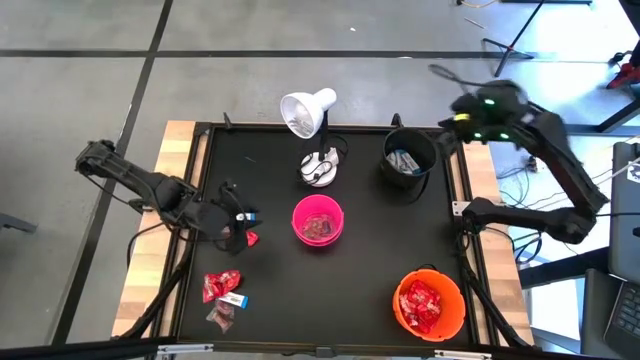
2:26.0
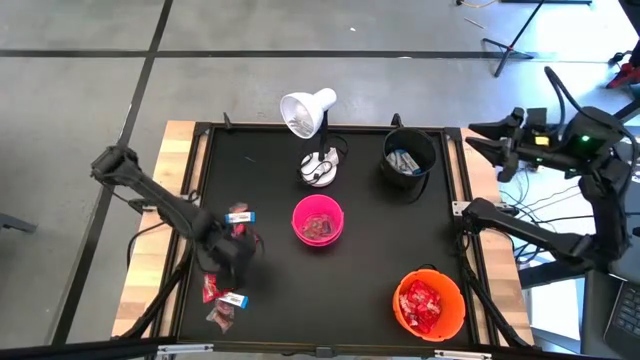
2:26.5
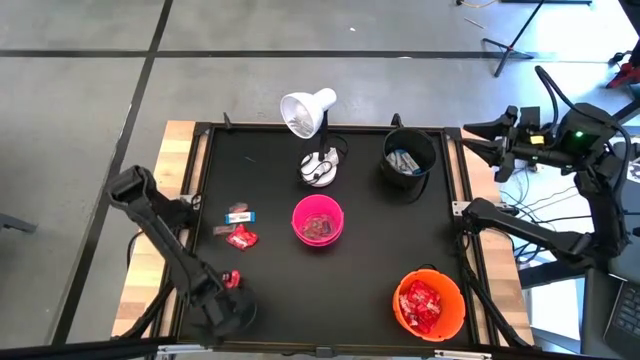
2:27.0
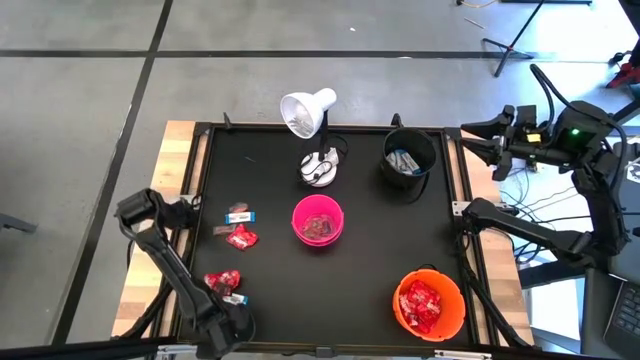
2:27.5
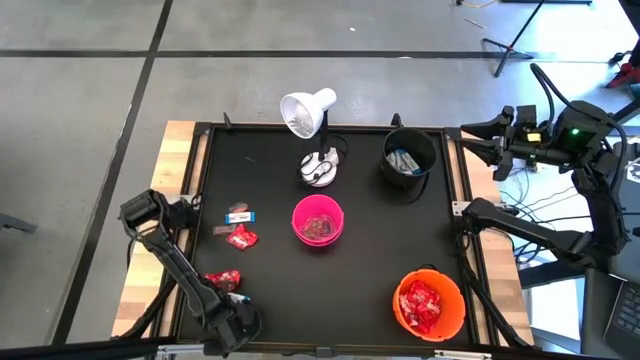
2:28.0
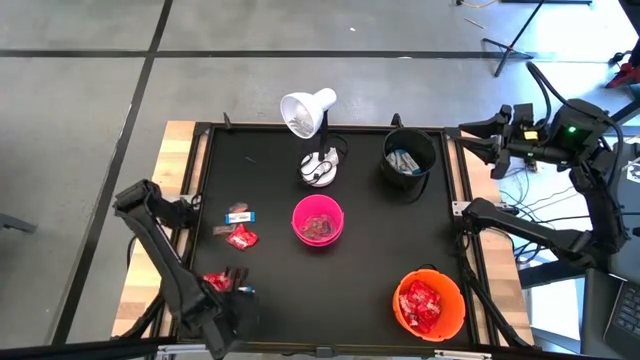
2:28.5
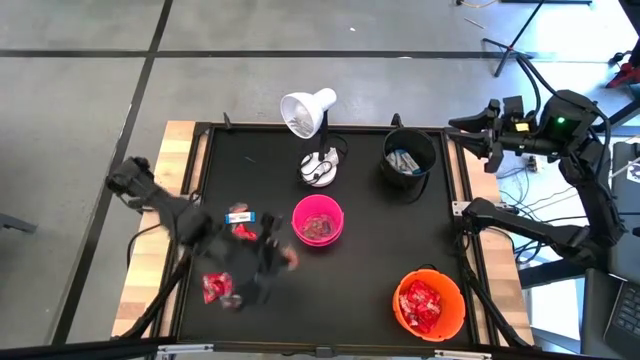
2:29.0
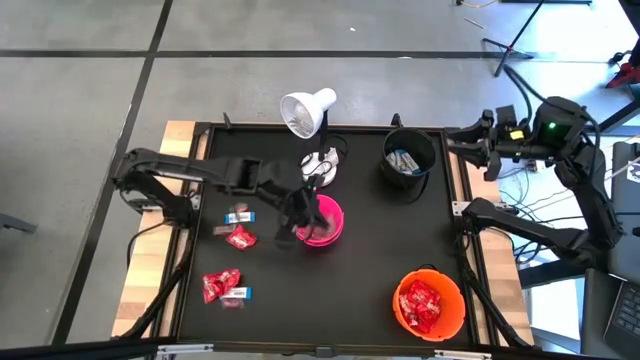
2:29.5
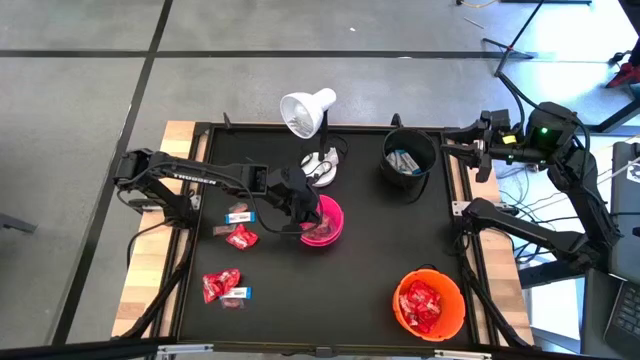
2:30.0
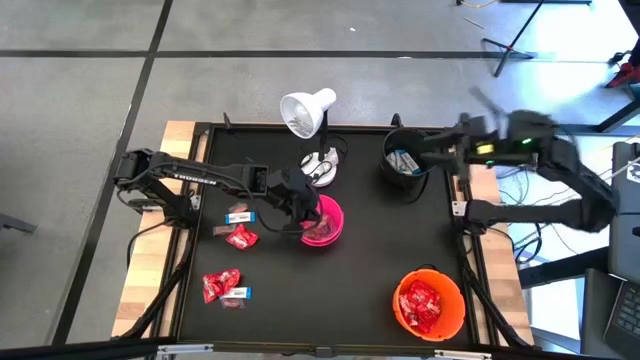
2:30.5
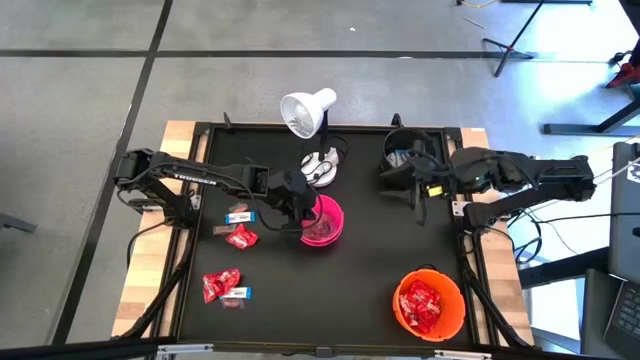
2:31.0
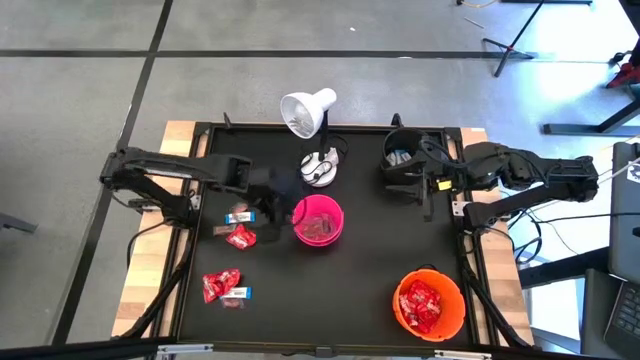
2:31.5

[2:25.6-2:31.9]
Task: Sort candy
Put the orange candy into the pink bucket

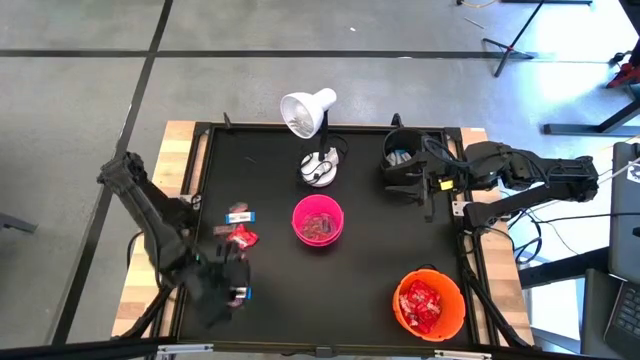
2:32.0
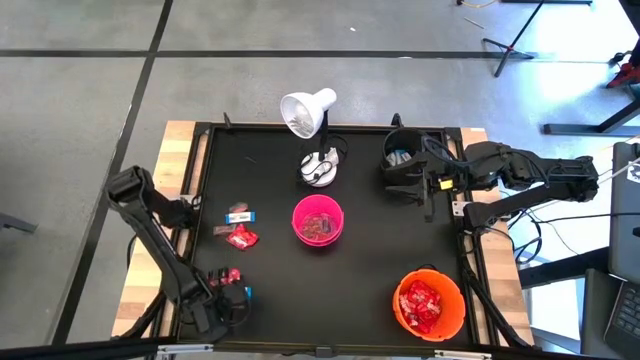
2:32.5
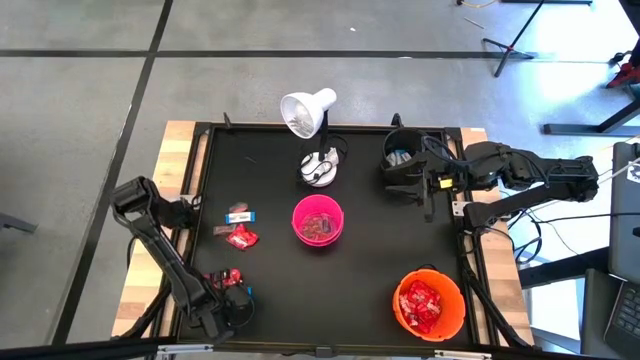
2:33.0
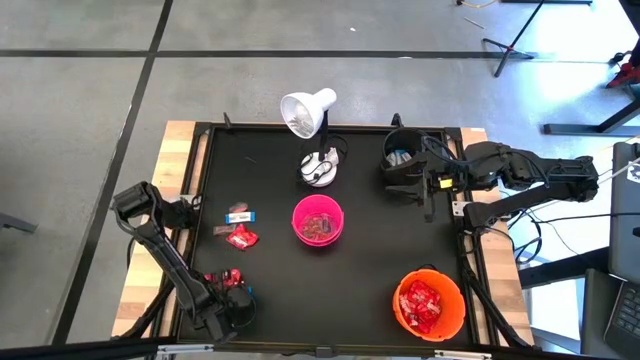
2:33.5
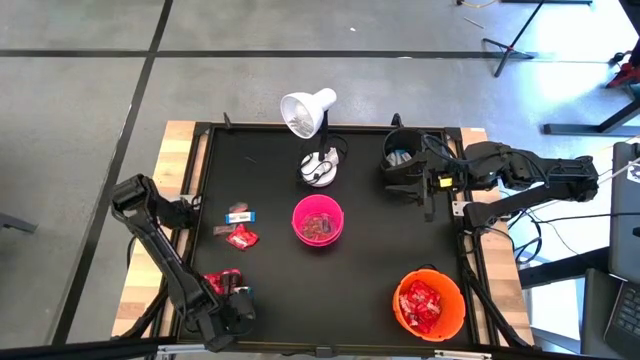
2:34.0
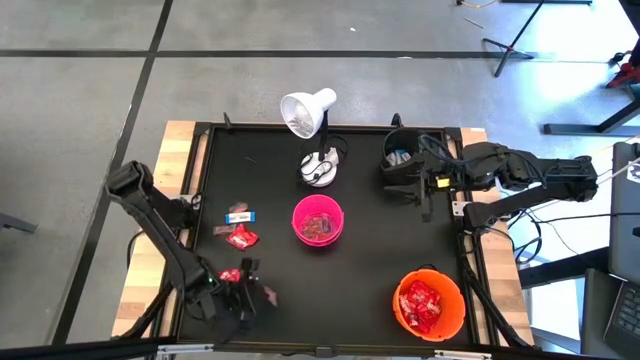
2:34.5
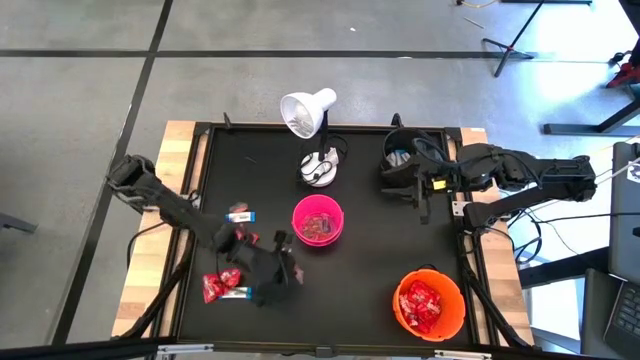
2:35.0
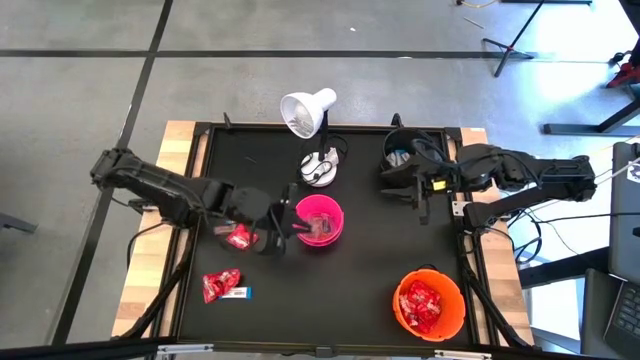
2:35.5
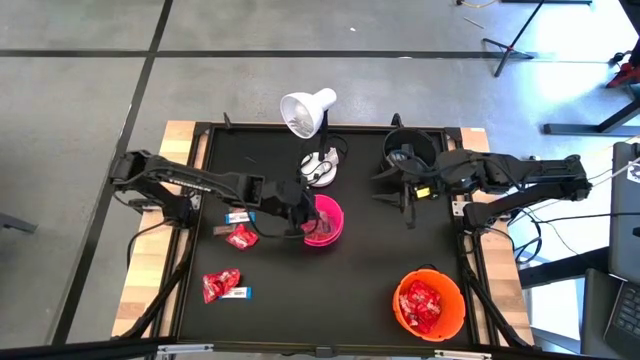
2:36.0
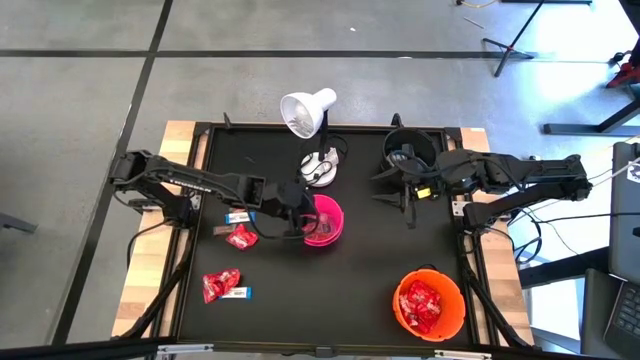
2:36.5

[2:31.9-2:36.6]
Put the orange gummy into the pink bucket

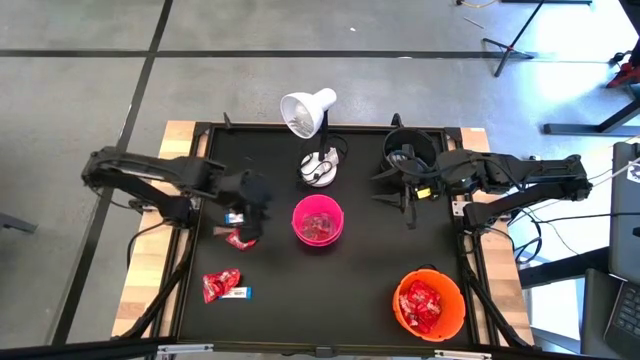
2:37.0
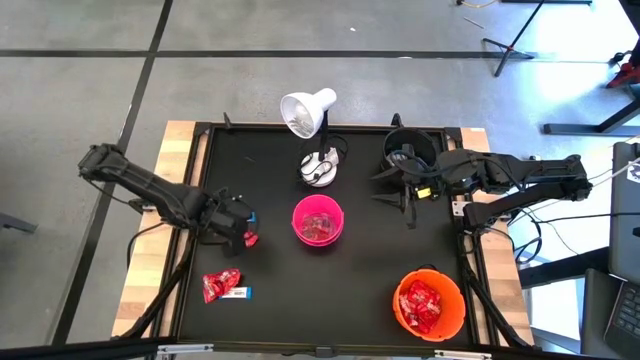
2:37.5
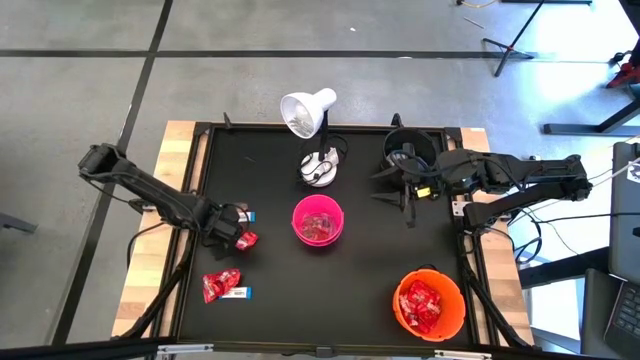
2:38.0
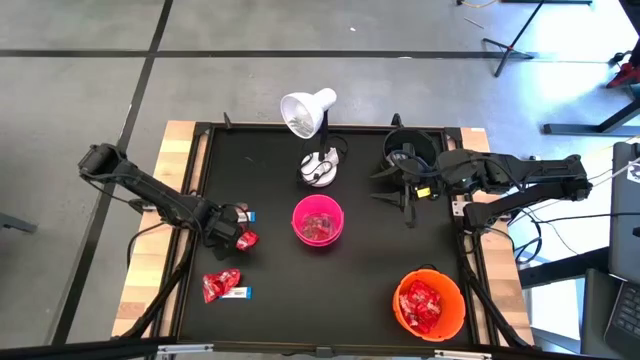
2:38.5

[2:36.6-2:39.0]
Put the orange gummy into the pink bucket

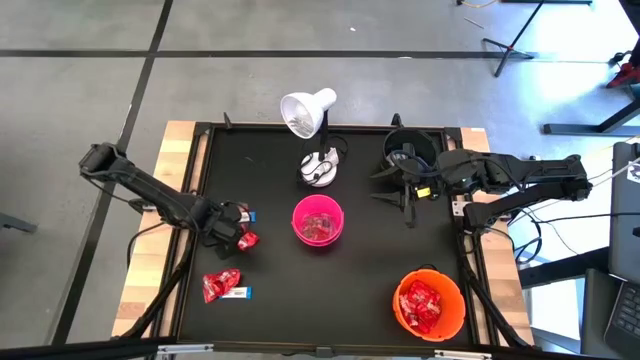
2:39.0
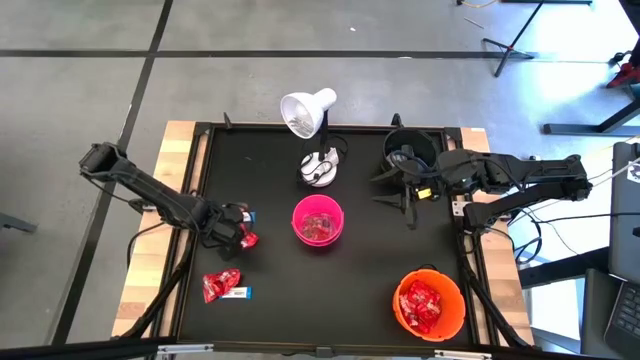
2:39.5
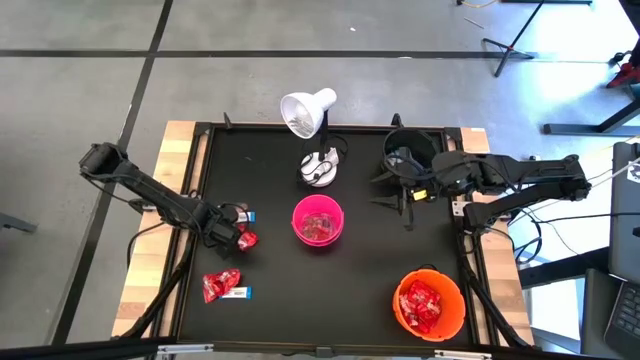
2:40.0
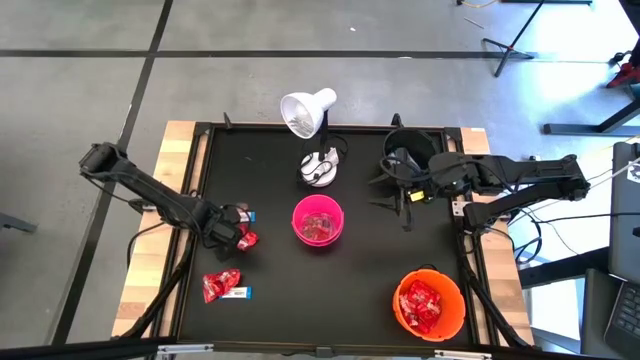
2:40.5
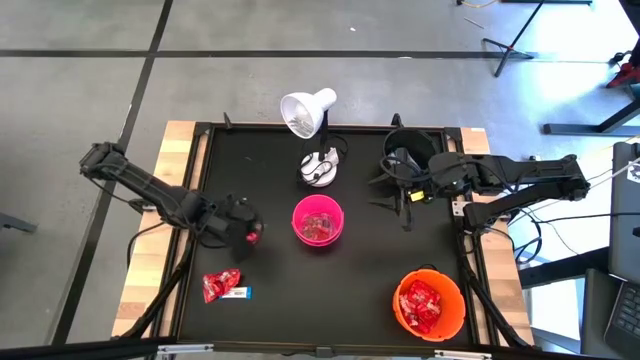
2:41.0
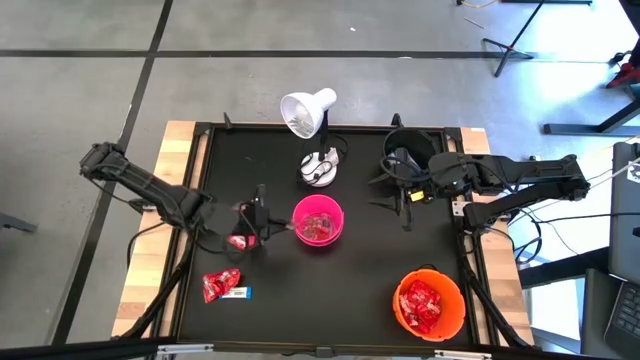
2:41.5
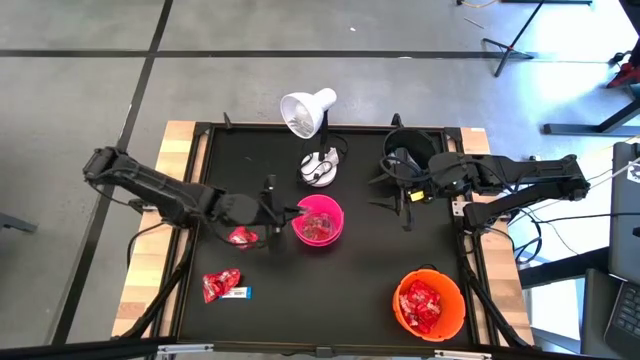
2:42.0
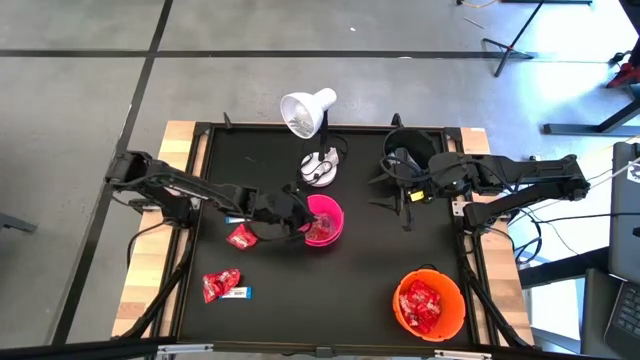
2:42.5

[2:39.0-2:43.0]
Put the orange gummy into the pink bucket

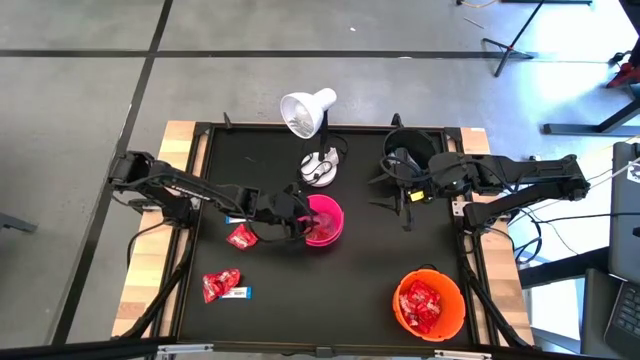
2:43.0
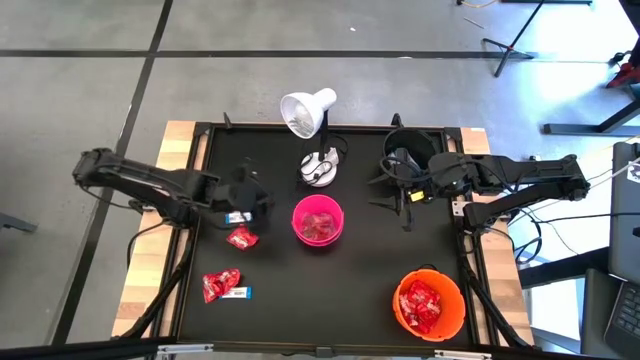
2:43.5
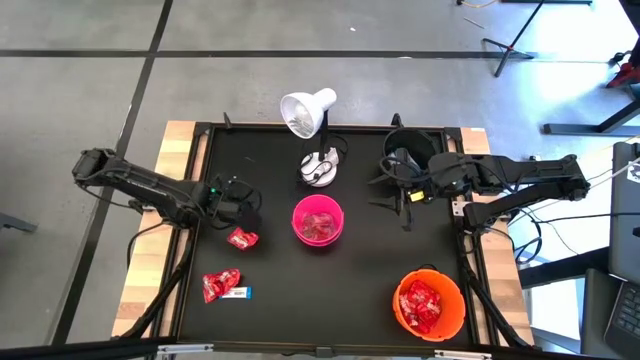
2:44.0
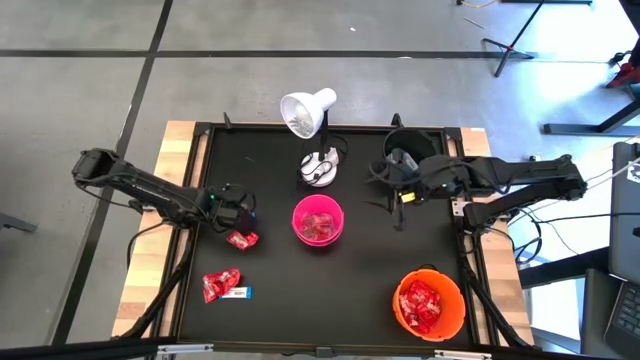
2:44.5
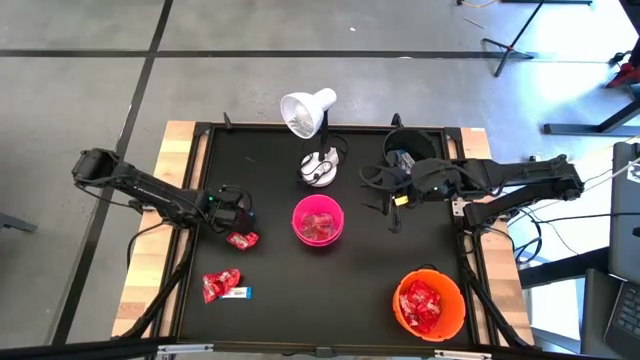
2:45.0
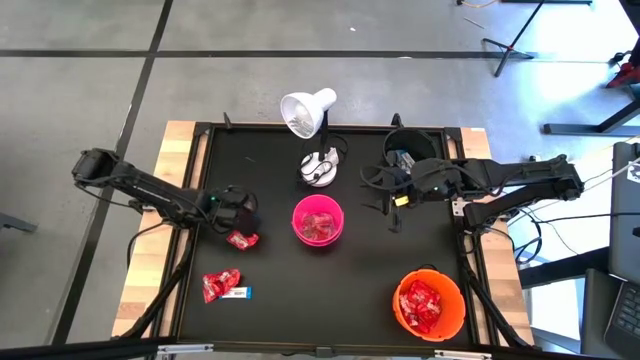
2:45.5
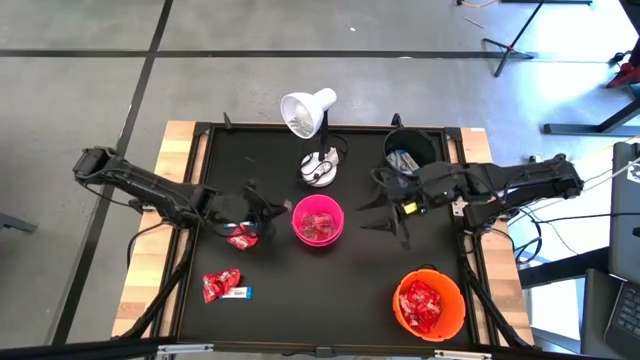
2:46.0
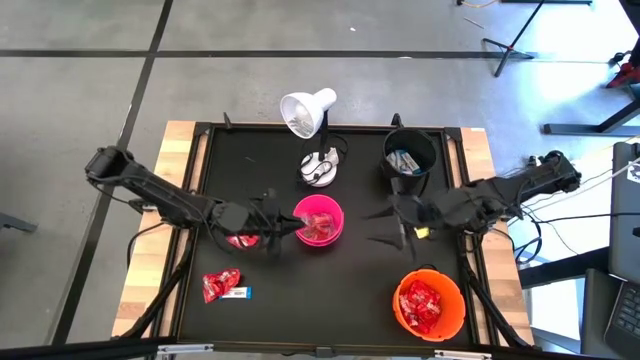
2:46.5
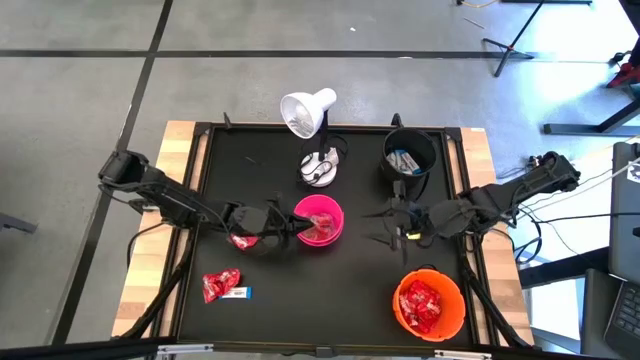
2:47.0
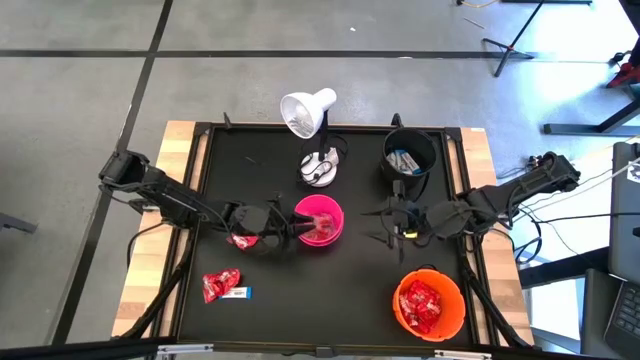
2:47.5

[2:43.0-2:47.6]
Put the orange gummy into the pink bucket
